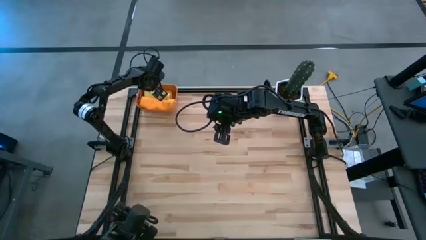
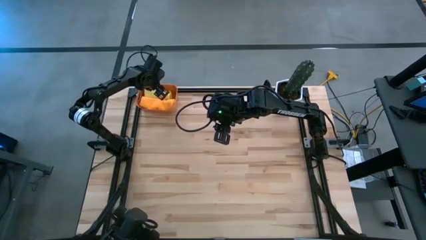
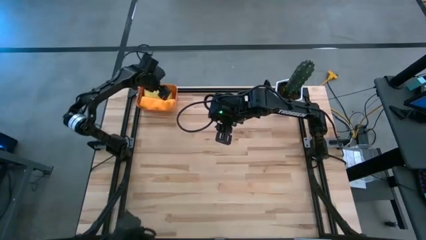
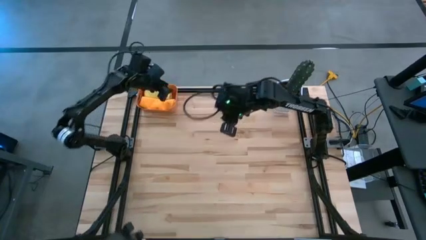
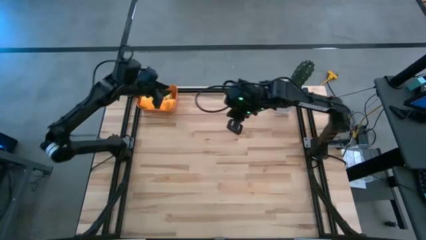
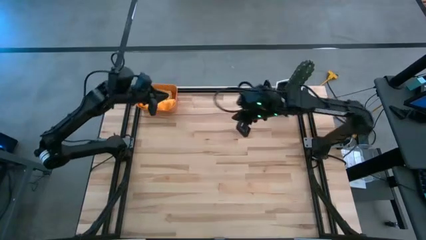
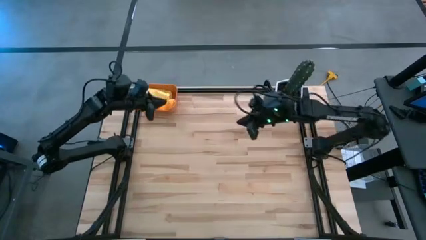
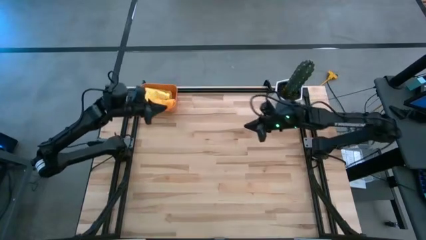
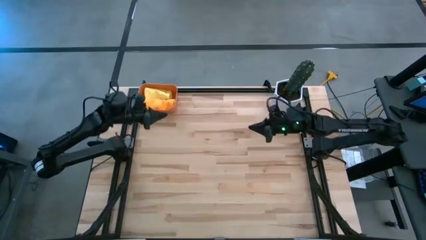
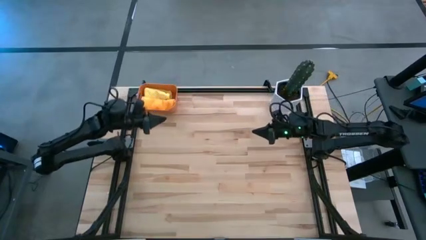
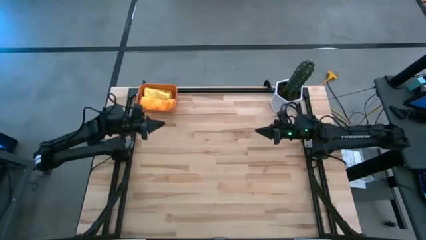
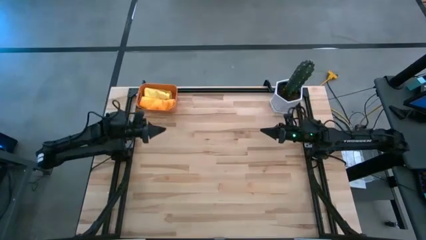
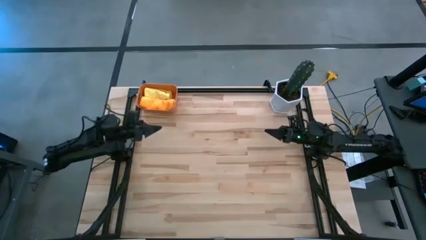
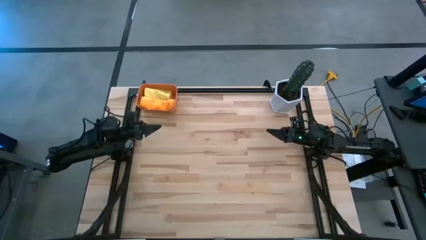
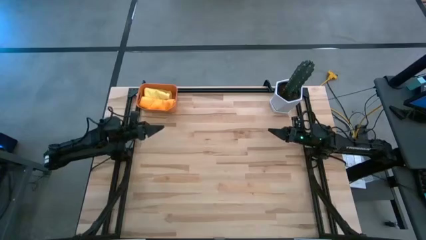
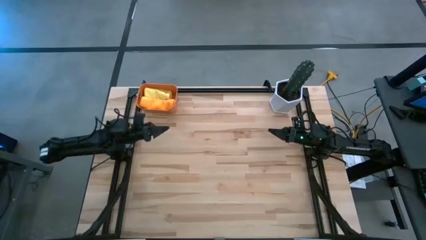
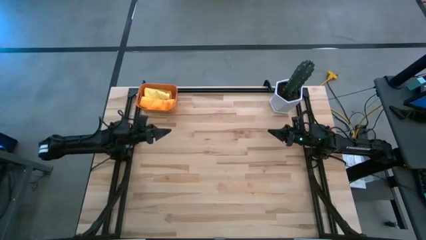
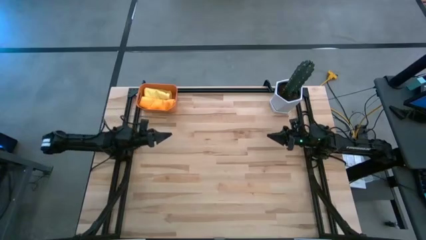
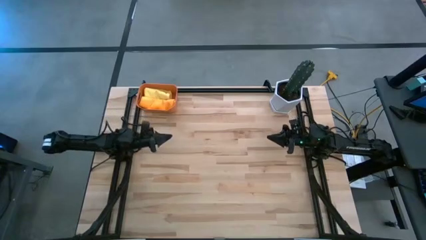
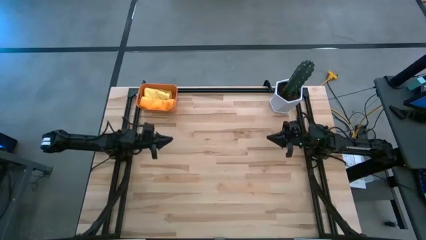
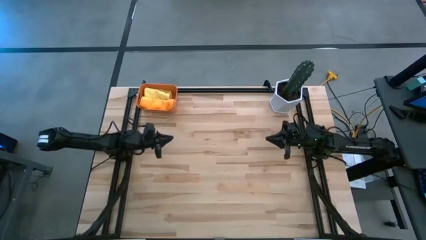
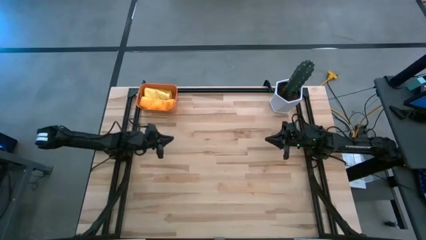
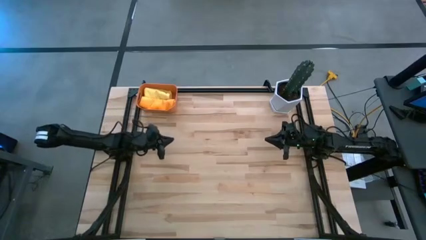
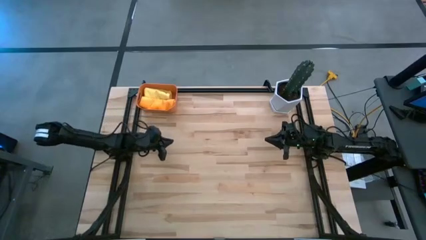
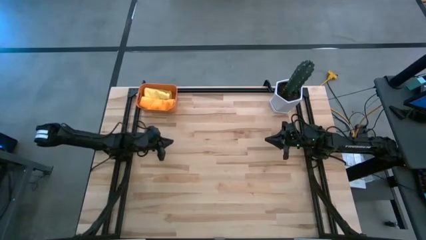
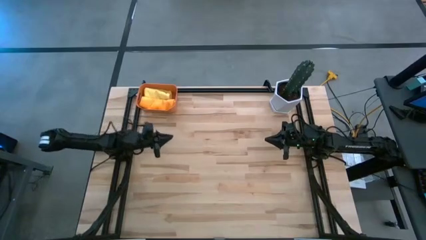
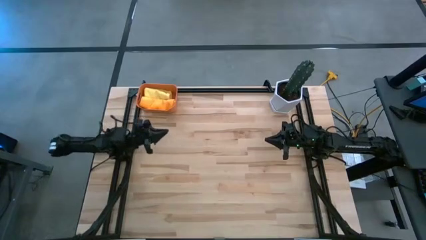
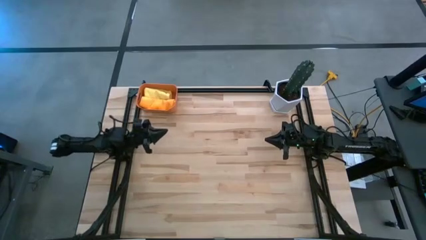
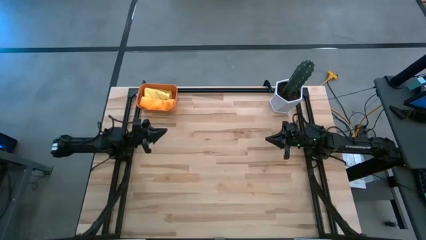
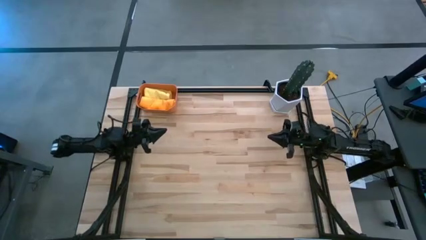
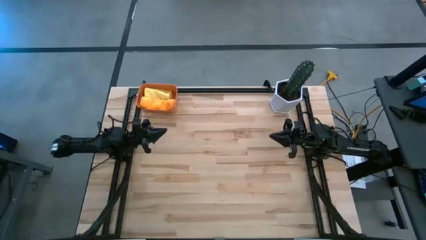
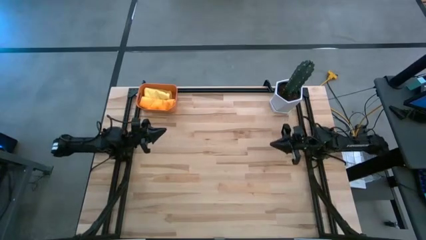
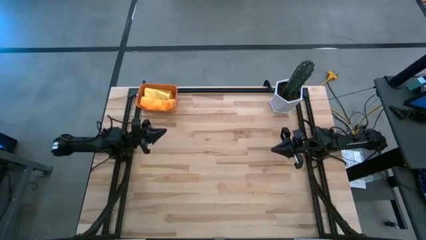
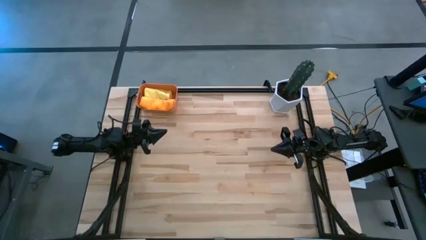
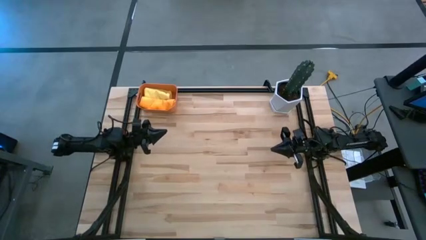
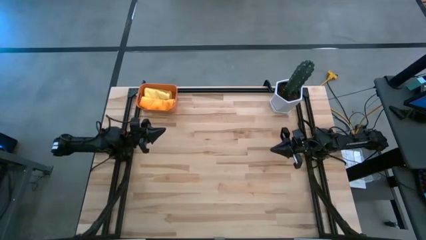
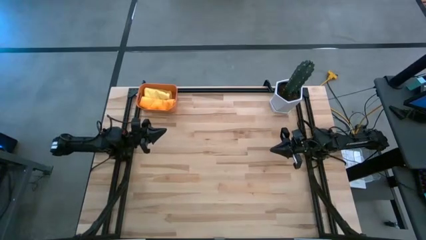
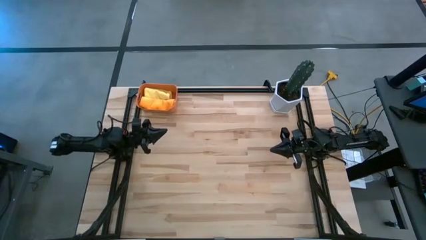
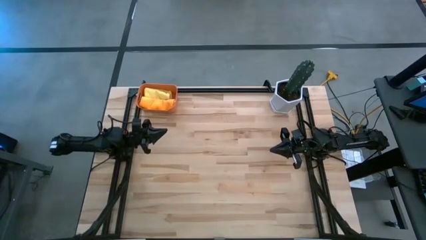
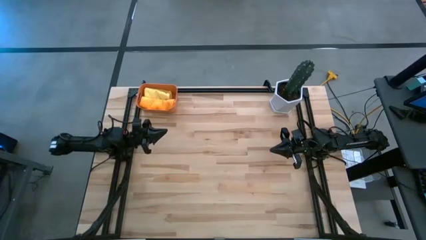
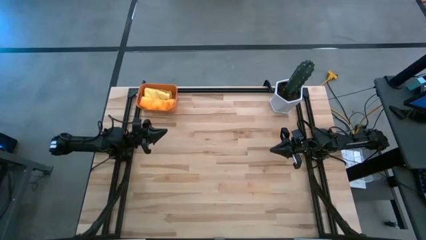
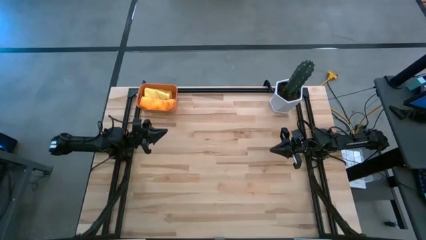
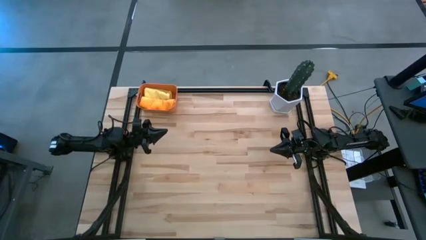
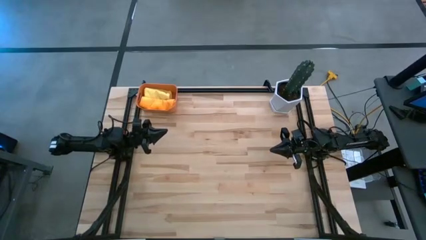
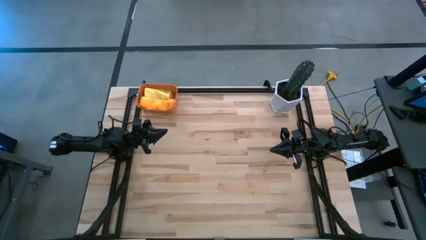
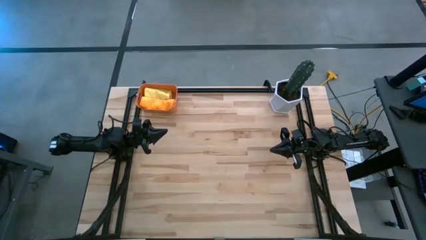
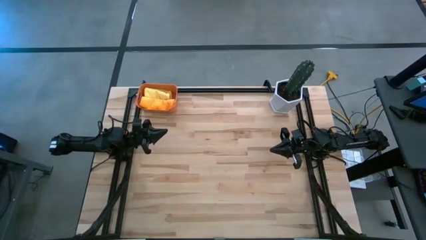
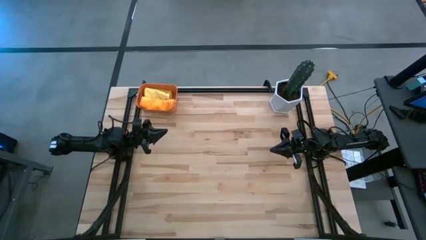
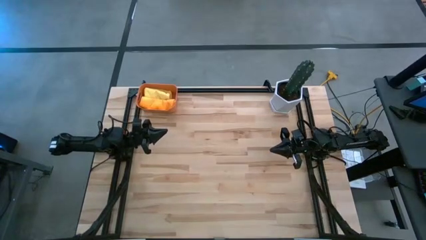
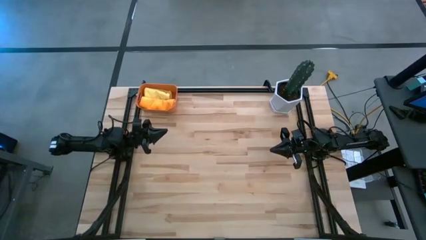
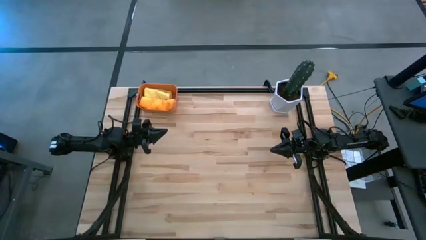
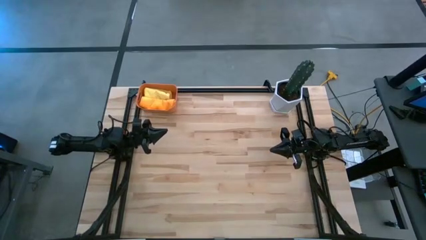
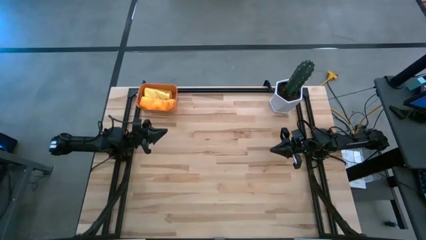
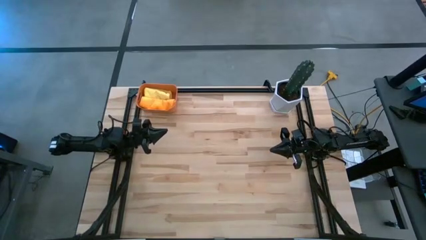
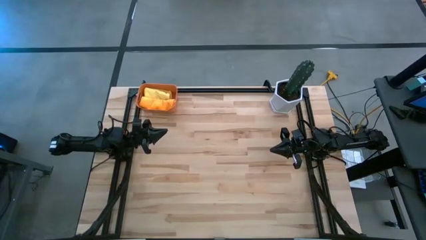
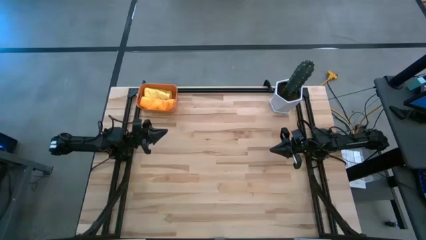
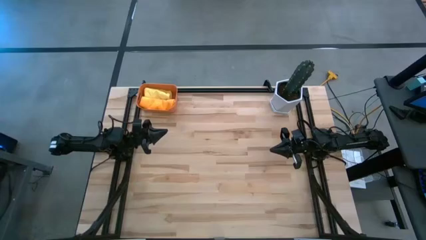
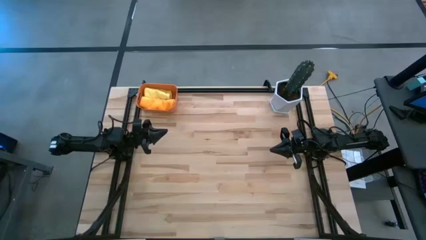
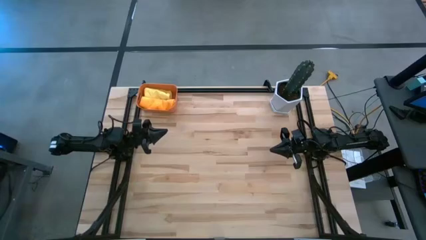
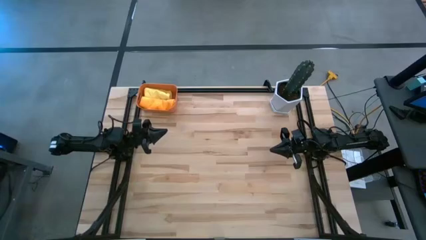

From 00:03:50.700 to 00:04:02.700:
Task: Roll microfiber towels into tight, uniform cylinder then place into a basket
Return to Home Position
